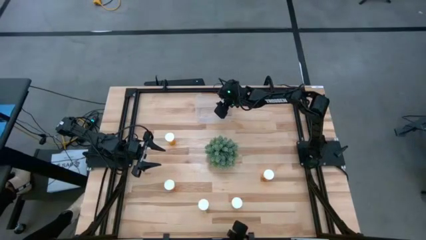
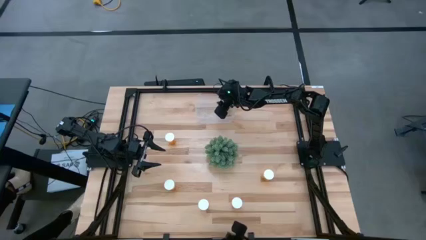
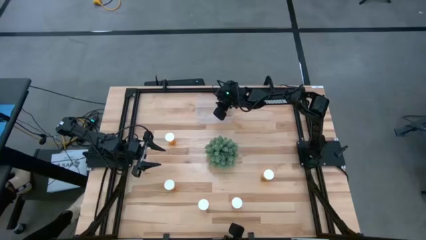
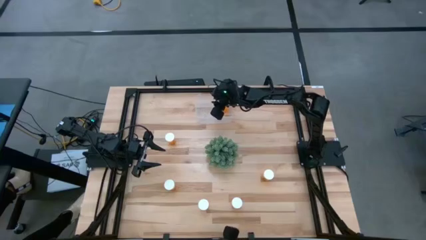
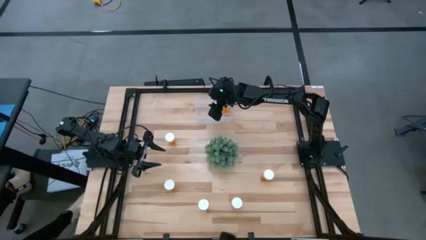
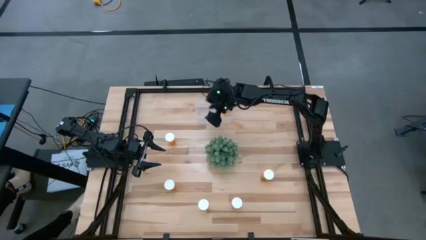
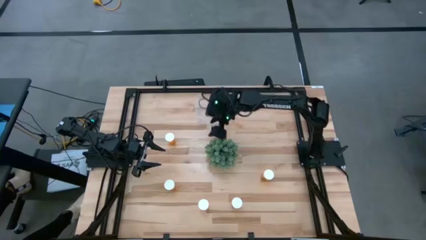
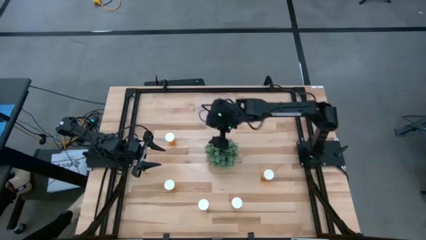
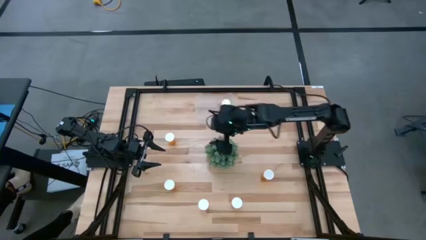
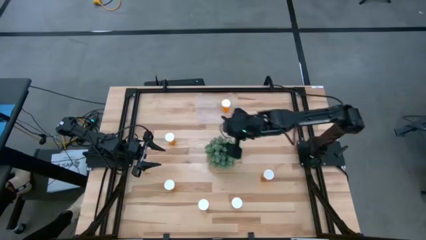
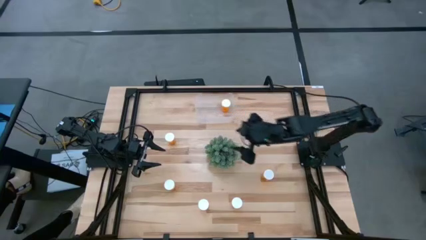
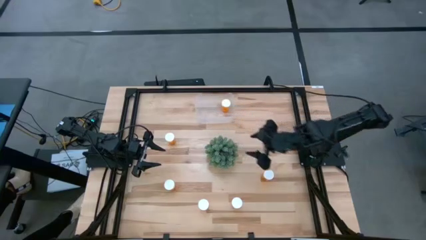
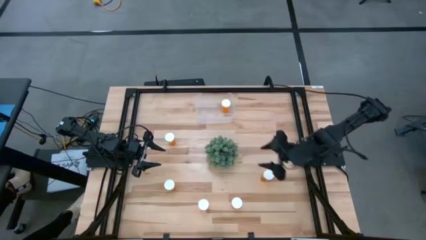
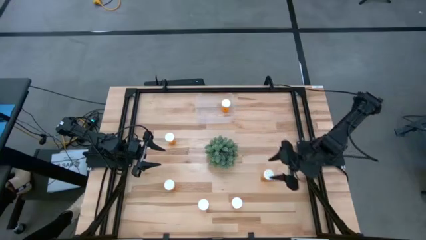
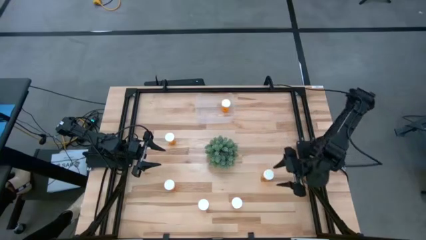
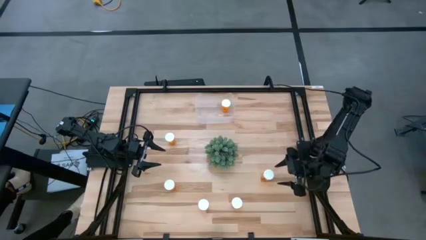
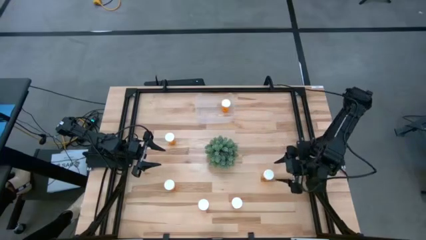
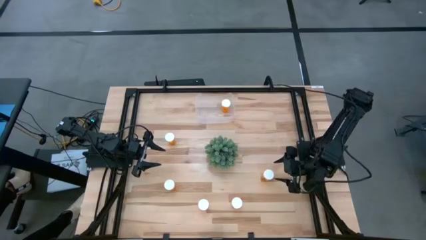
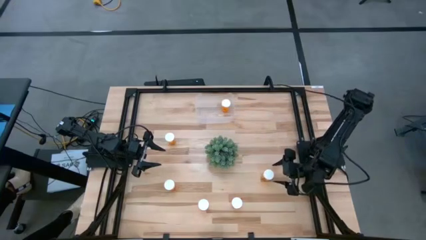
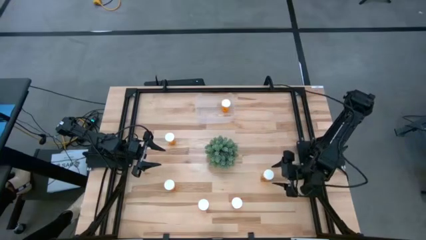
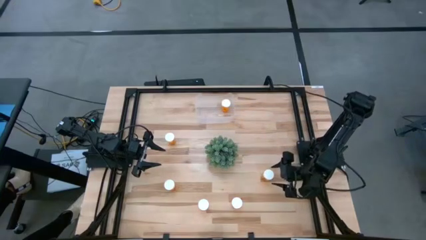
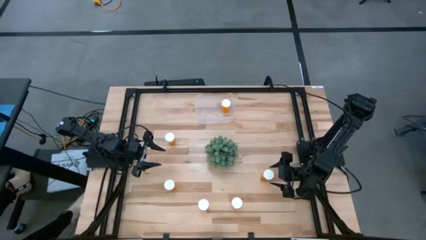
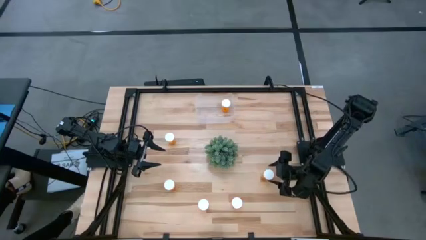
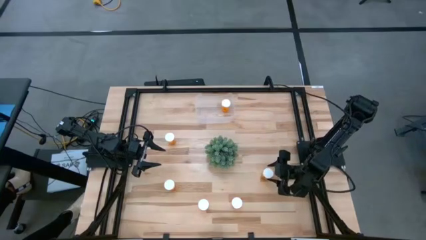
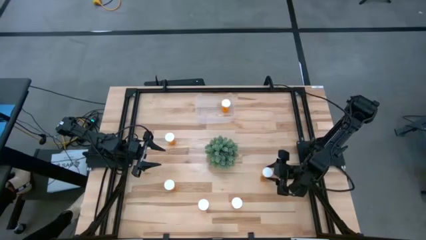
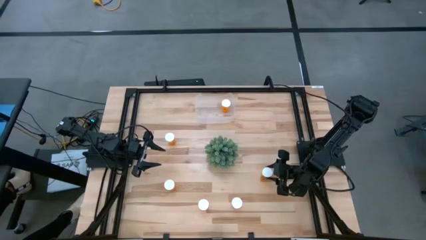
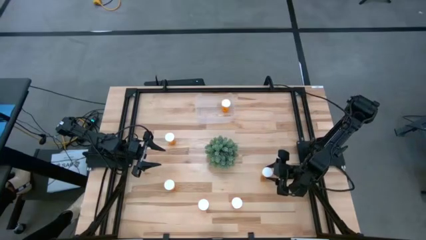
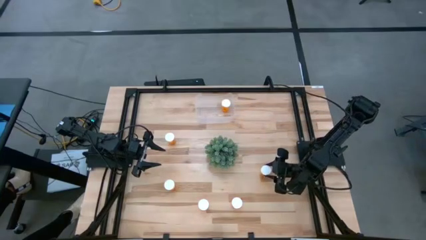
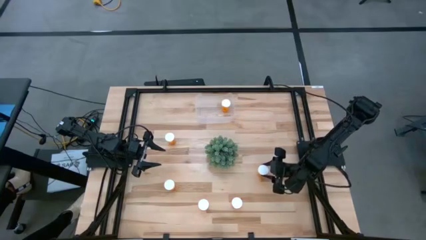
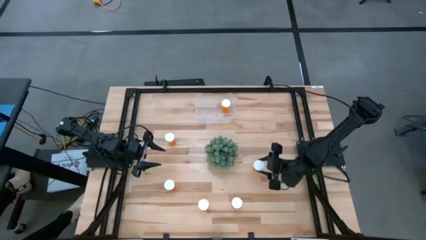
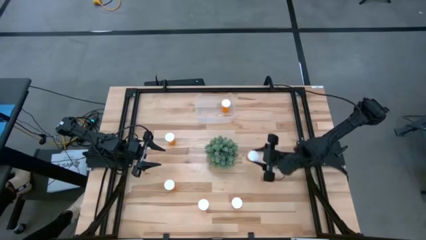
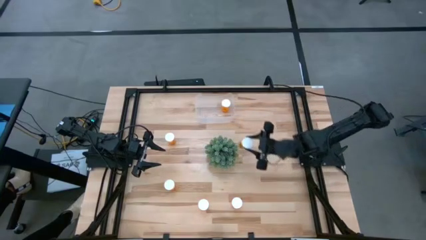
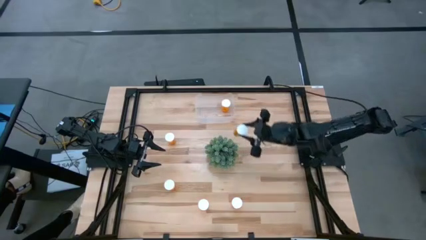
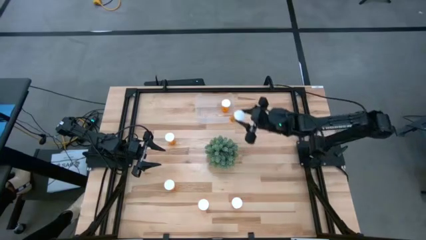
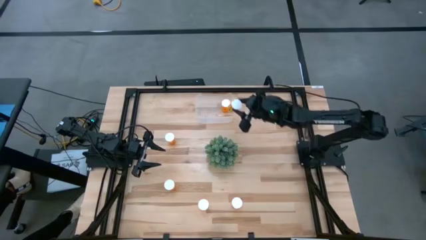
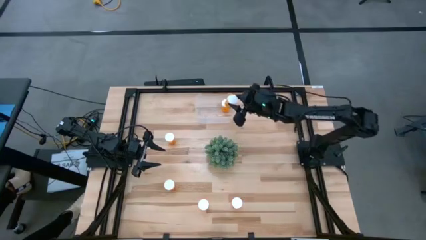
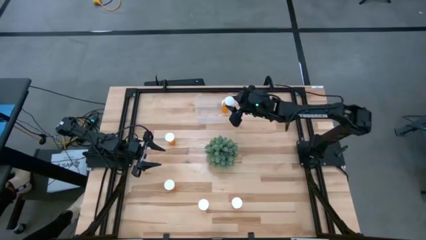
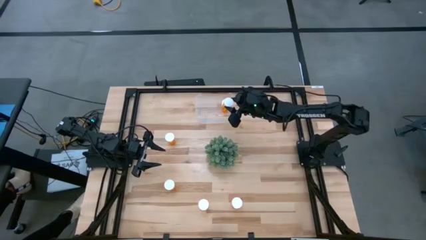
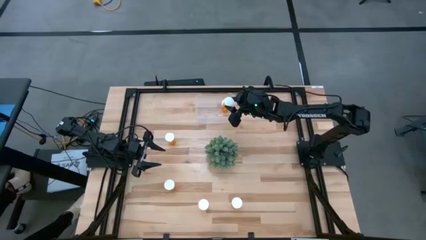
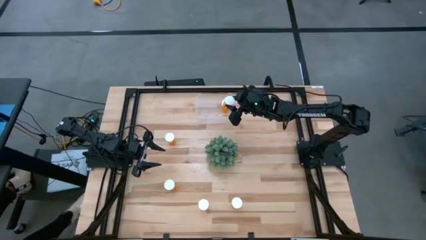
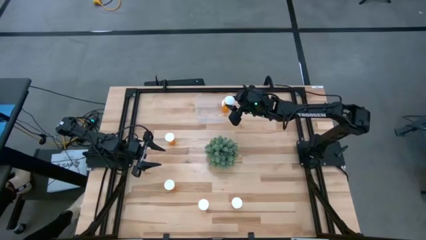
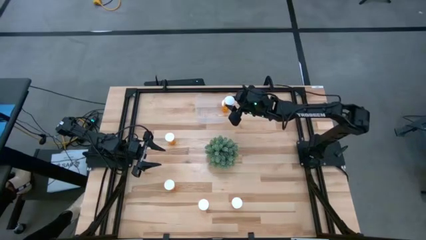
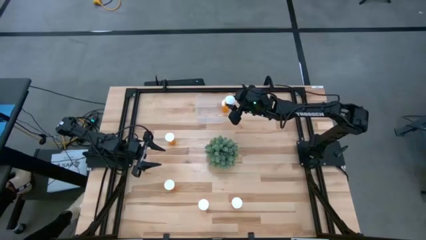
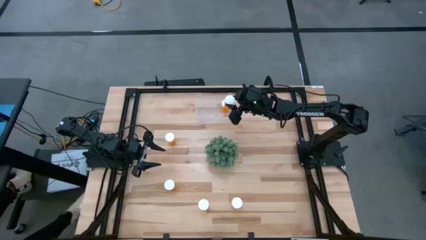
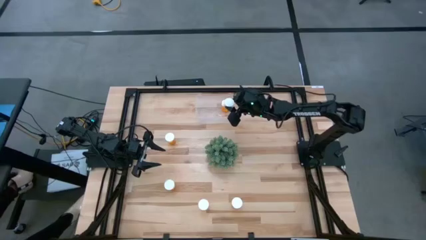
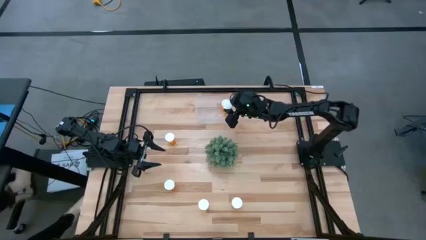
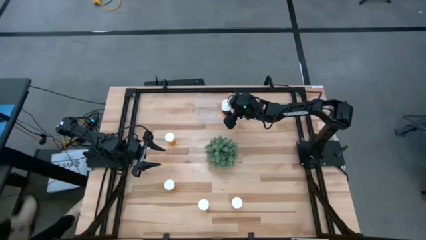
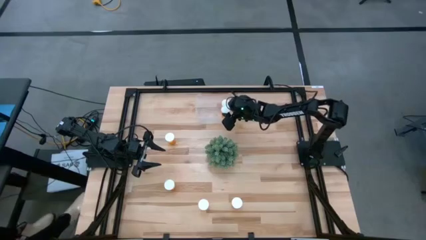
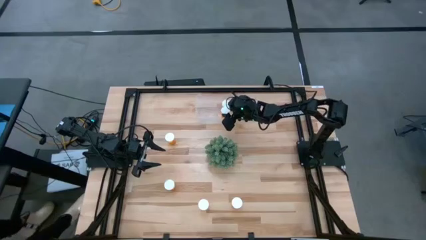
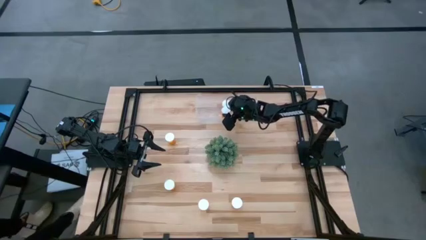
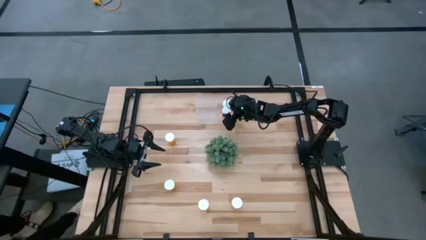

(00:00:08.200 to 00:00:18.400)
Task: Pick and place pill bottles into a basket
Put the orange pill bottle into the transparent bin
